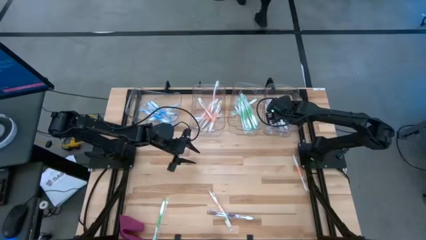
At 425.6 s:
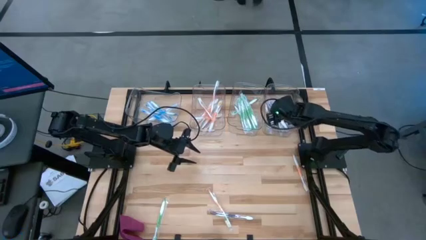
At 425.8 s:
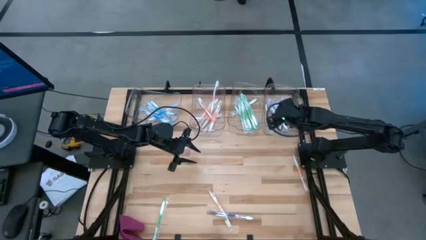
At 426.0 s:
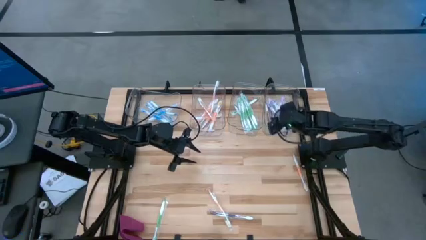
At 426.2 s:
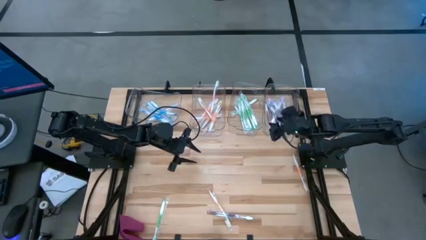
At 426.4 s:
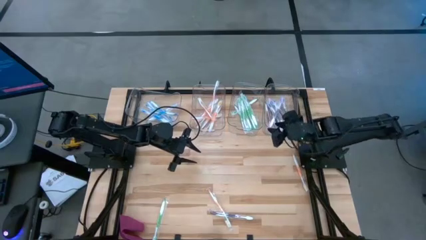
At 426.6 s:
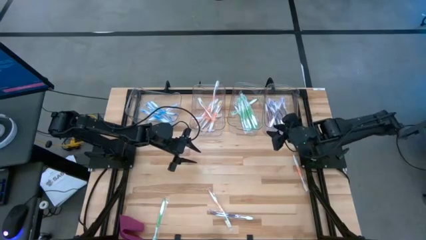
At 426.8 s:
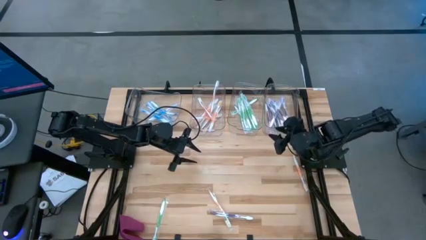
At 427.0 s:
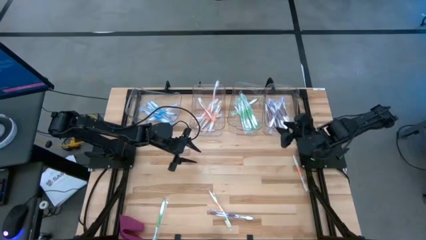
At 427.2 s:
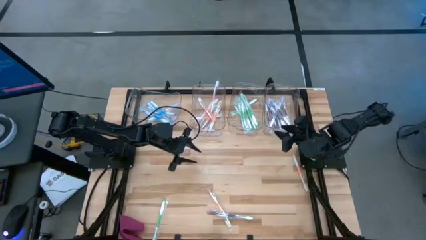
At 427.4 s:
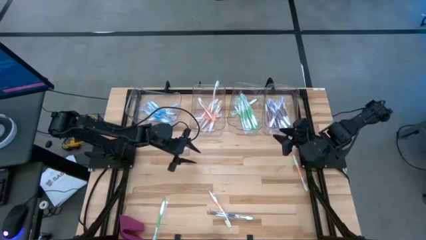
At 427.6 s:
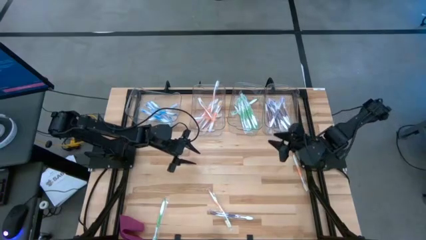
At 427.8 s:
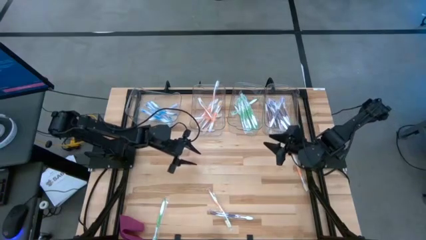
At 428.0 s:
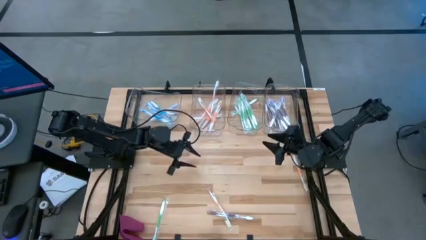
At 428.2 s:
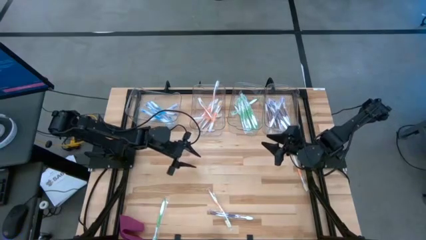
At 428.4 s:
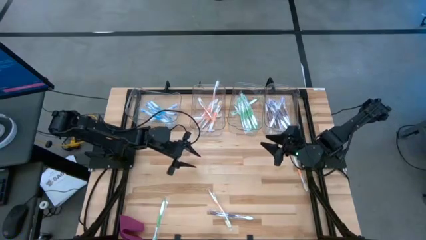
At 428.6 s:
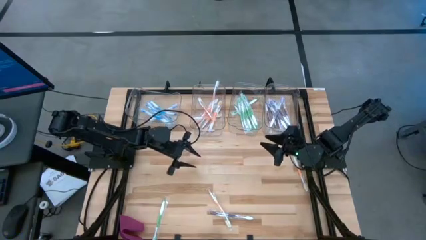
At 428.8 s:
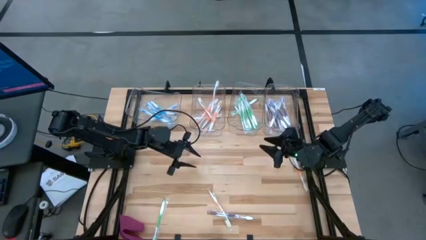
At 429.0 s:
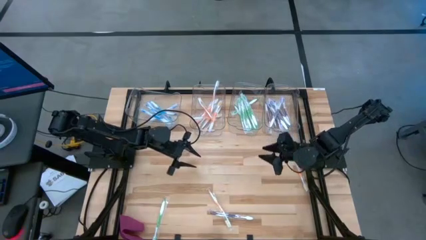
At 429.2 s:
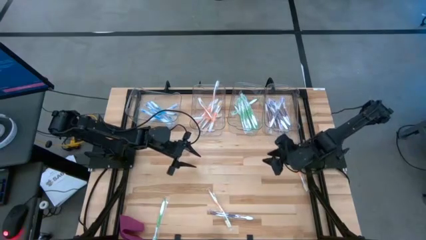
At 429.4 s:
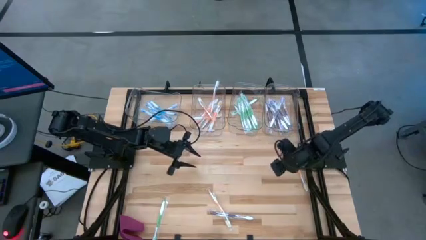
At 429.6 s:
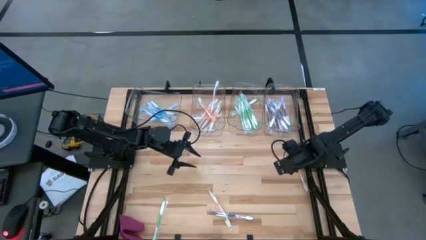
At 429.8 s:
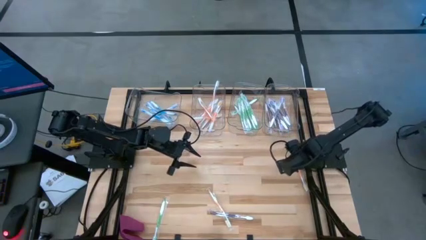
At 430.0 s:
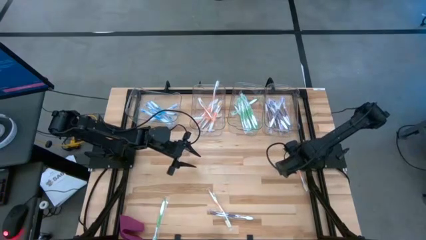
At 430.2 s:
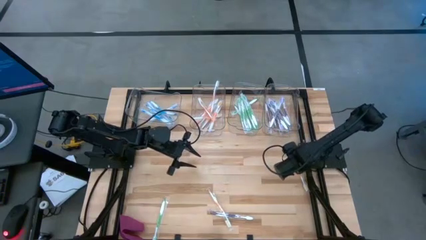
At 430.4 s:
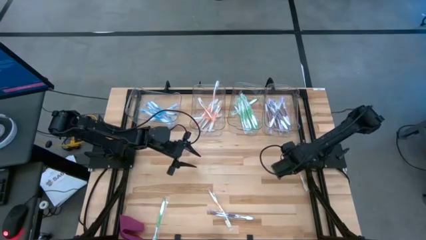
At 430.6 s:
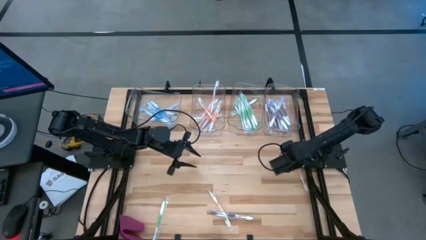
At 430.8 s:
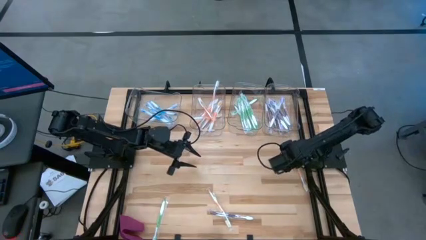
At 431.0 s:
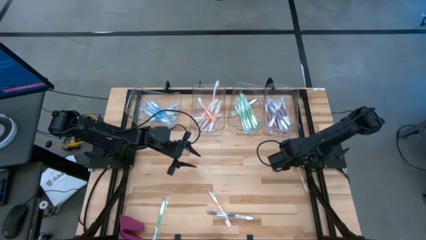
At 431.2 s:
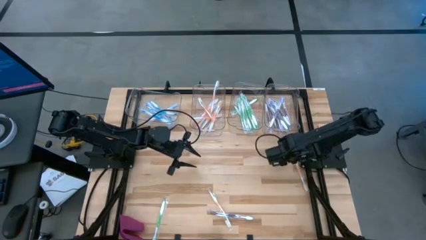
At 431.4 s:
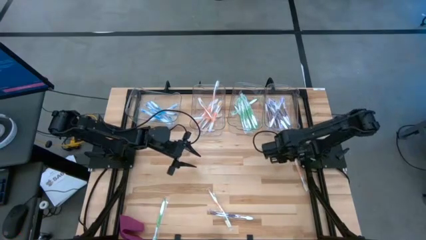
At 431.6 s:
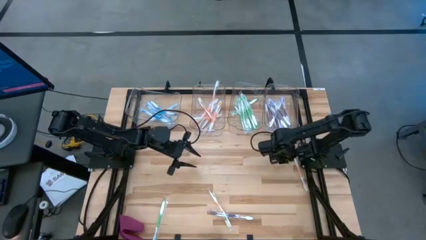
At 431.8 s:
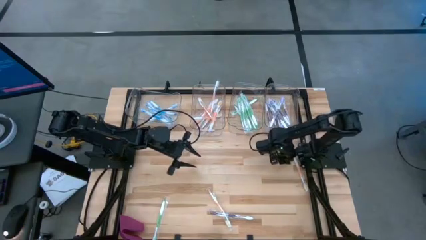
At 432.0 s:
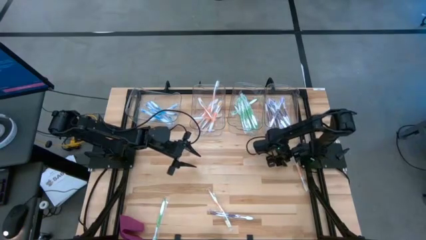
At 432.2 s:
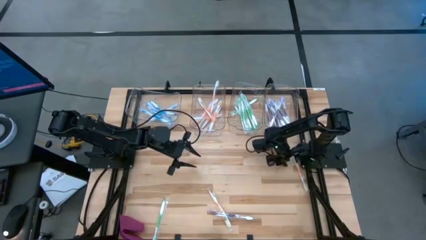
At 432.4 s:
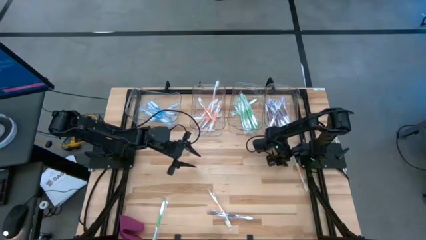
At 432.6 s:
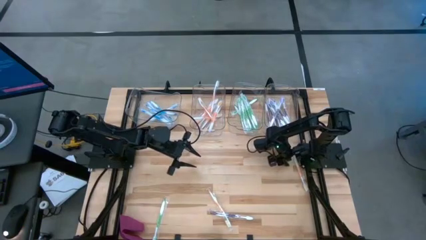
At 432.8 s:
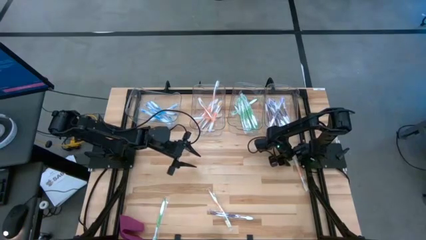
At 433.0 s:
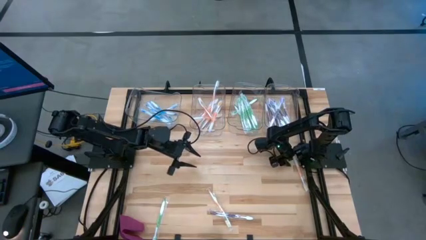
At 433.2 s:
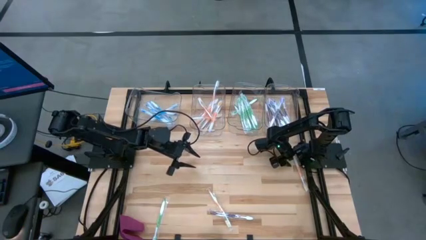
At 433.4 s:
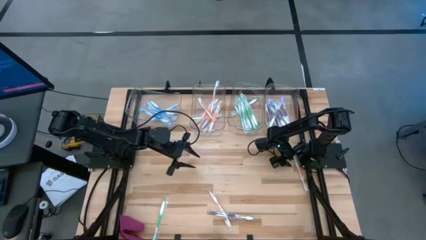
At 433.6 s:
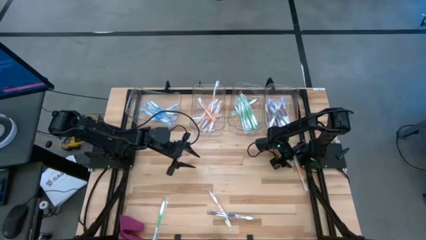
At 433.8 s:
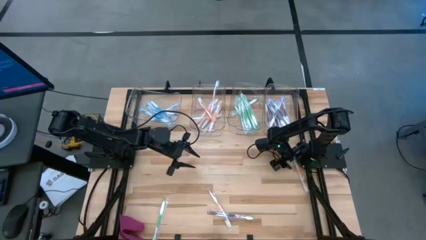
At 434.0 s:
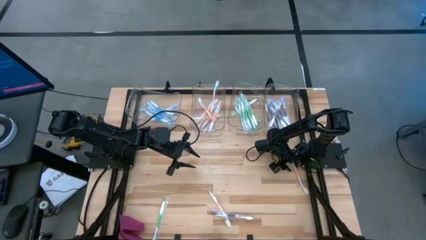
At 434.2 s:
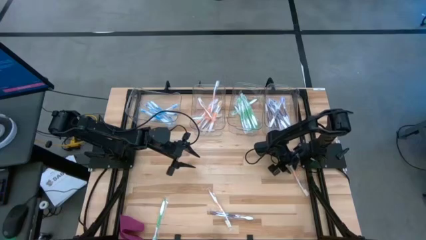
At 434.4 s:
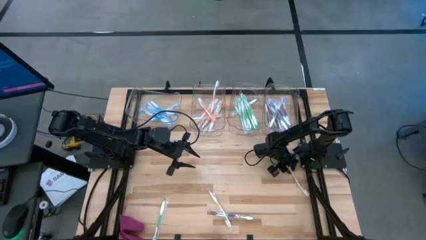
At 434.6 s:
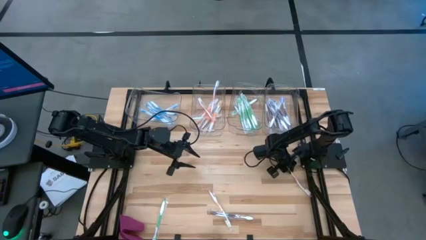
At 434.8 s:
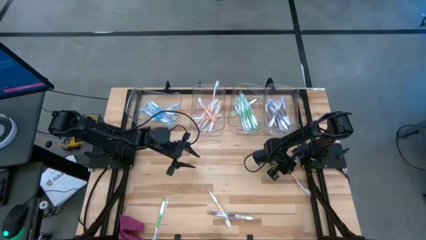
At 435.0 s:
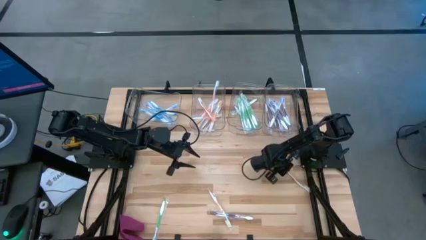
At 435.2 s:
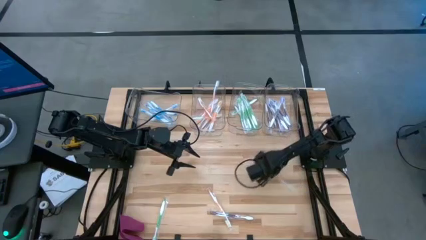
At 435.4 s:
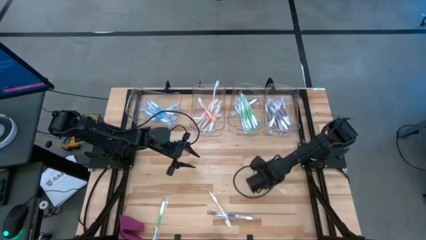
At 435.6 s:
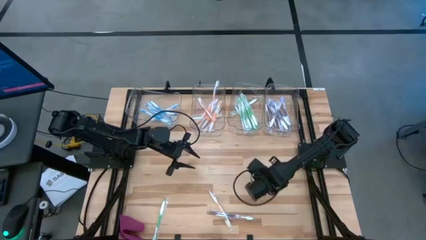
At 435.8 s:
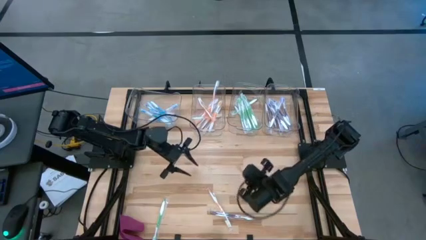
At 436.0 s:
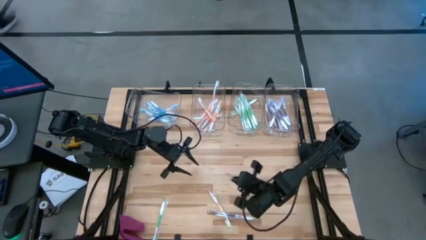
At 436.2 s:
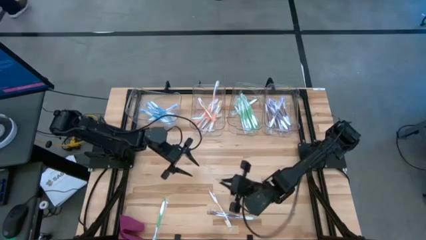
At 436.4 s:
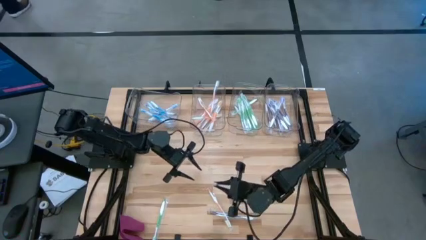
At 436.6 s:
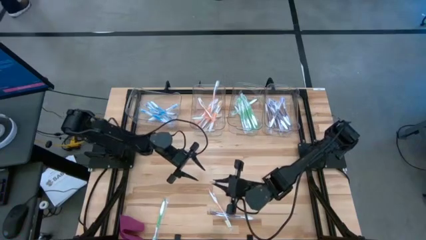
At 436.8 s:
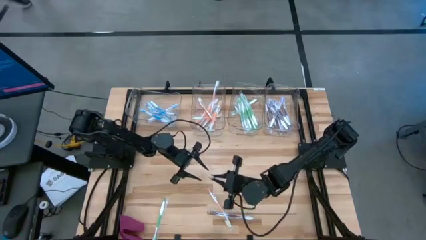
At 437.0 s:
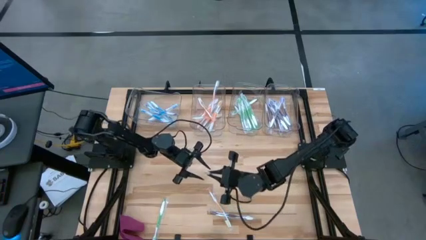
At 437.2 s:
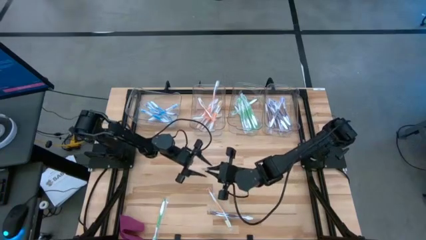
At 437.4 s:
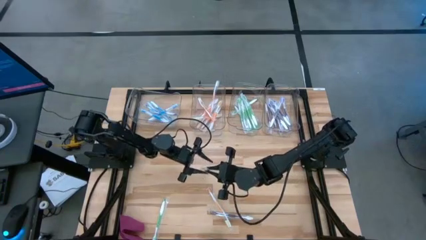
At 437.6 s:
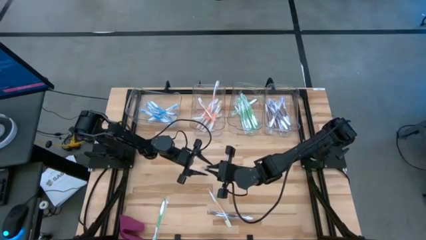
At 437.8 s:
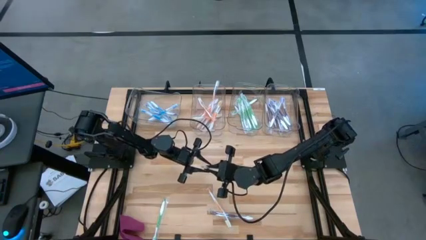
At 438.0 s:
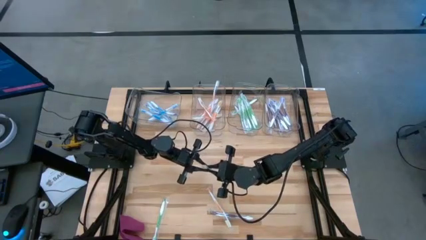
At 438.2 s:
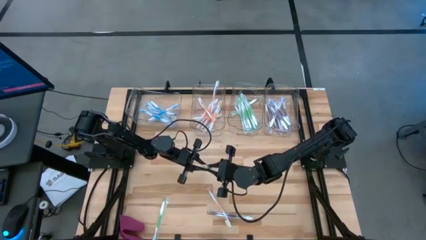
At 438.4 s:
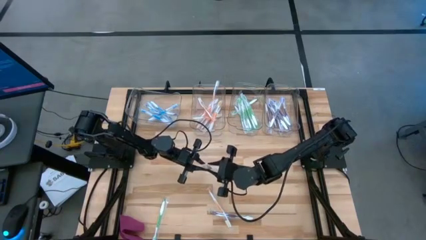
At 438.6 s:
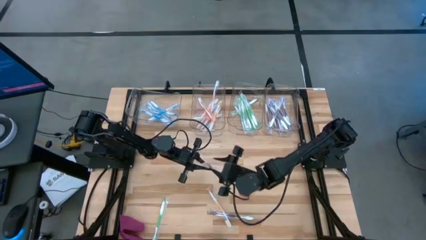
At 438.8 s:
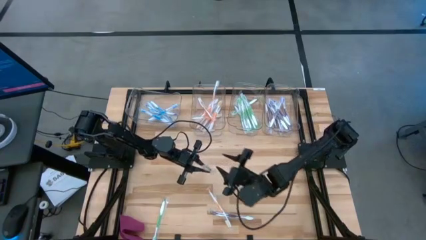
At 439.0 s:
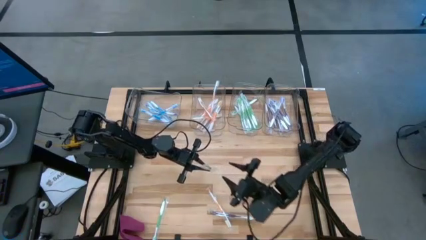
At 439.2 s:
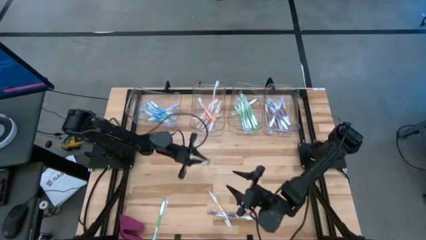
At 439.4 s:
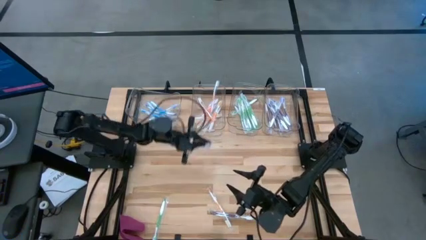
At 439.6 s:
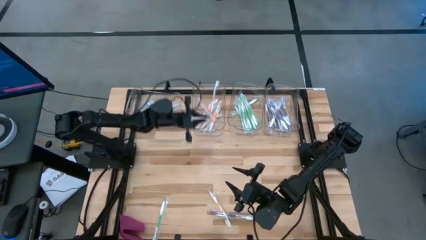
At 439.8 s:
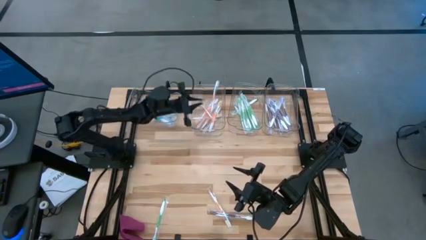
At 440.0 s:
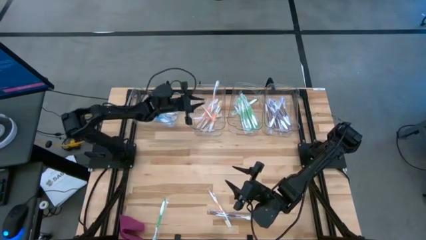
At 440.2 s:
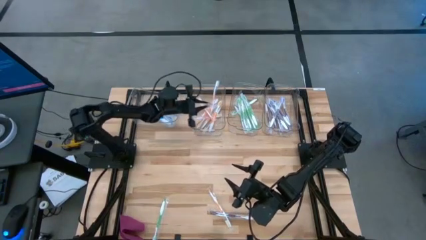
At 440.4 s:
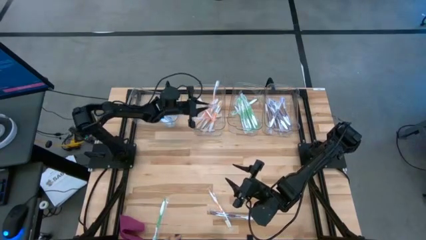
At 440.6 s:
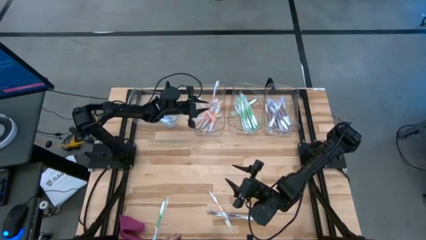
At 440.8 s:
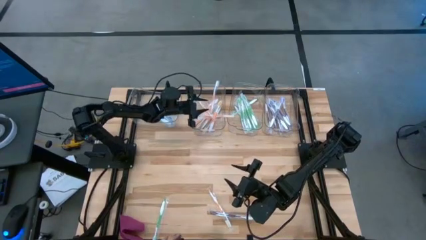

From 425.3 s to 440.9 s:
Task: Pick & Place Toothbrushes
Put the orange toothbrush into the middle left transparent bin

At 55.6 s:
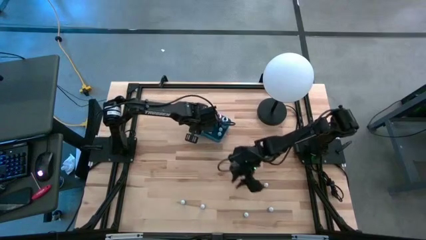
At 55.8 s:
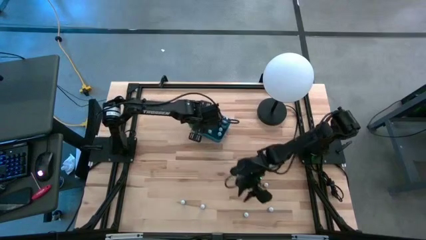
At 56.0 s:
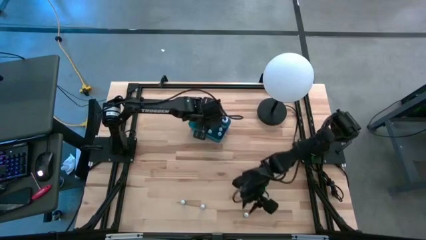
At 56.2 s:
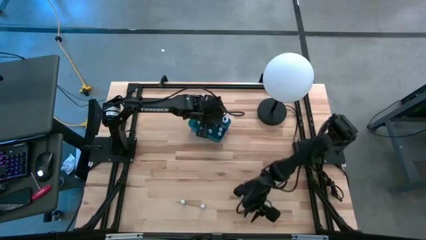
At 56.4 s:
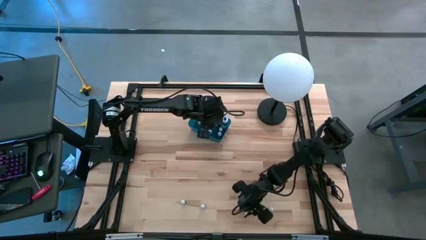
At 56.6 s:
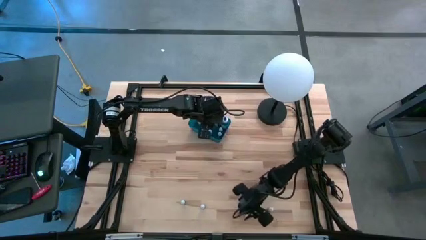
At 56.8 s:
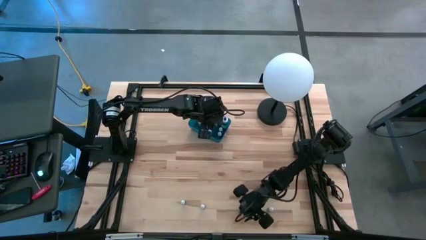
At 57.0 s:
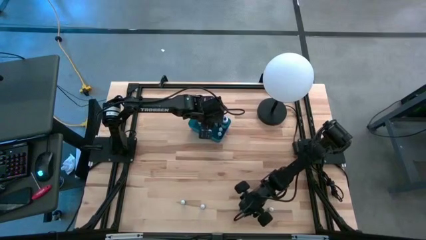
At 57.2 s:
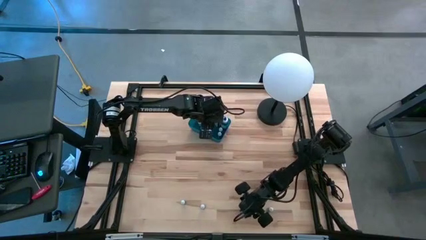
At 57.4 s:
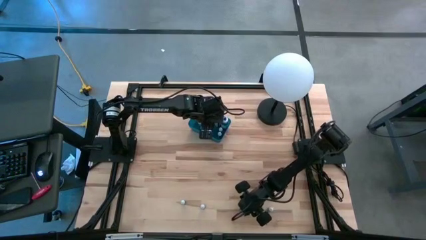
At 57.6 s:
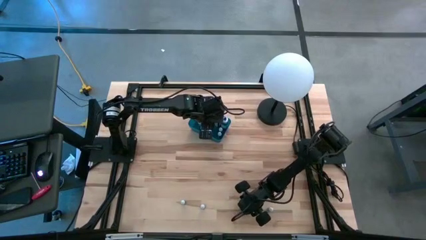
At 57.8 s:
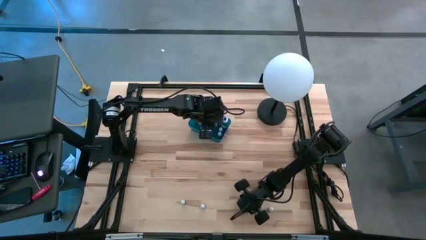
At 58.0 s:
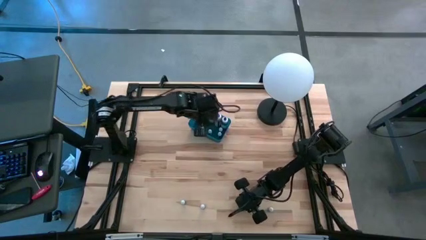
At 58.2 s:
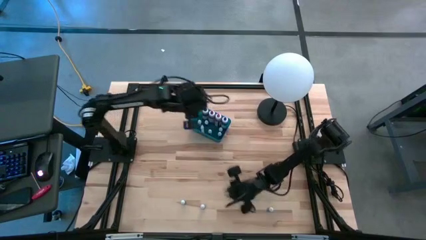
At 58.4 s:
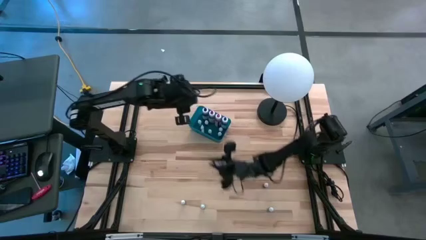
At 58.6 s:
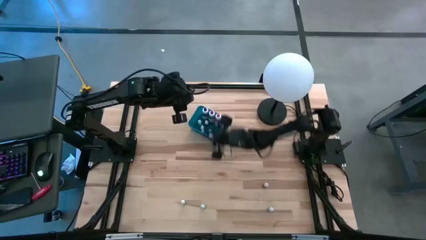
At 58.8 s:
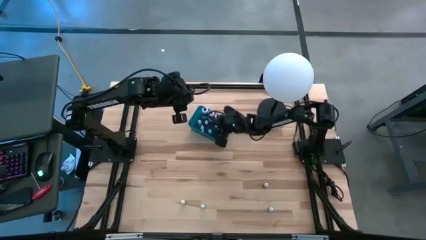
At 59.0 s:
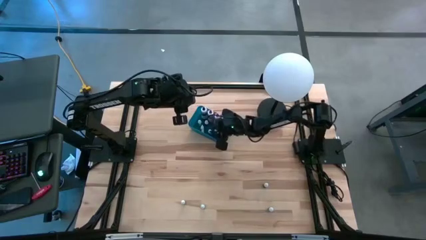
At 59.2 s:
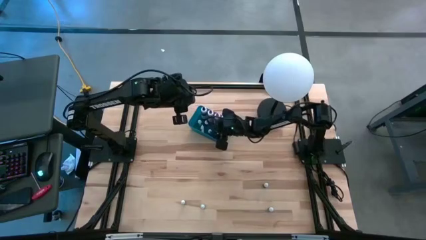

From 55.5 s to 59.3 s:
Task: Pick & Place food coloring
Put the small blue food coloring bottle into the blue bin
